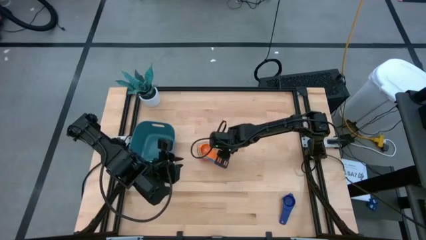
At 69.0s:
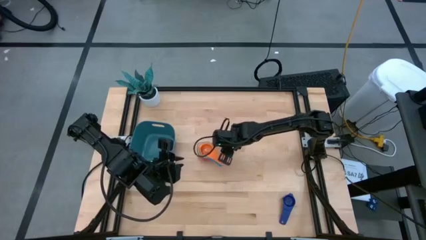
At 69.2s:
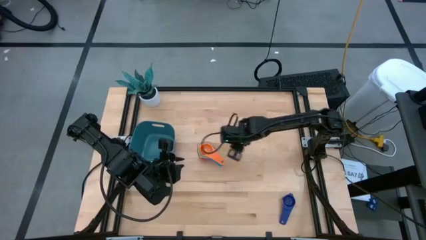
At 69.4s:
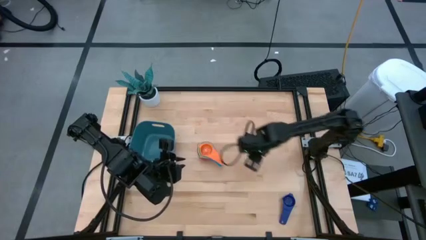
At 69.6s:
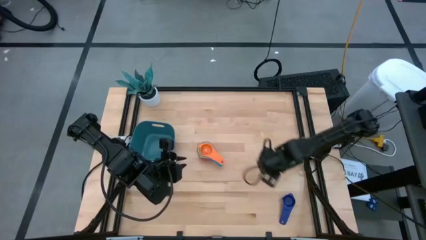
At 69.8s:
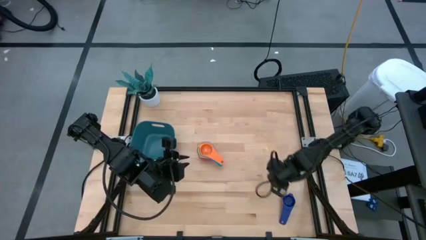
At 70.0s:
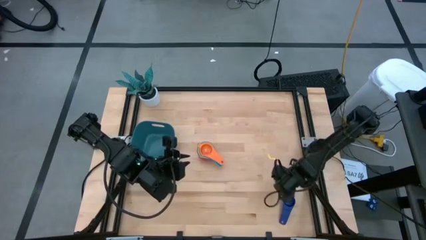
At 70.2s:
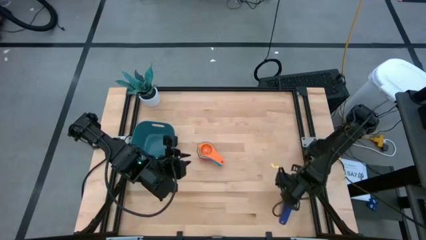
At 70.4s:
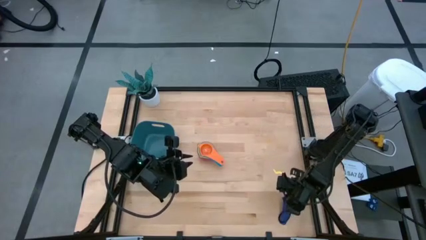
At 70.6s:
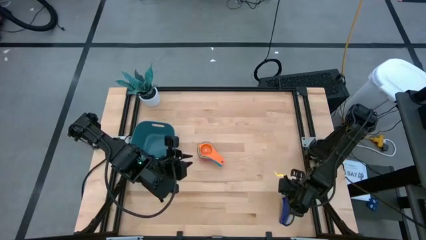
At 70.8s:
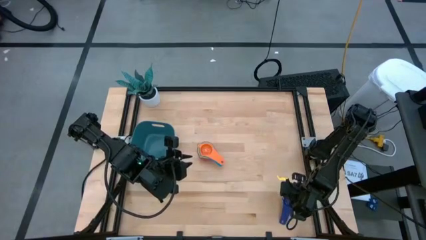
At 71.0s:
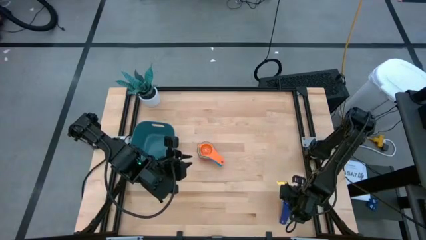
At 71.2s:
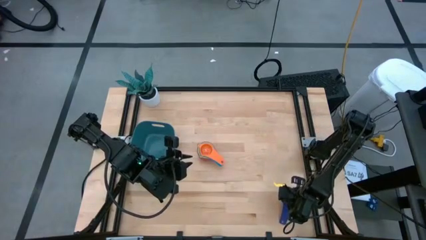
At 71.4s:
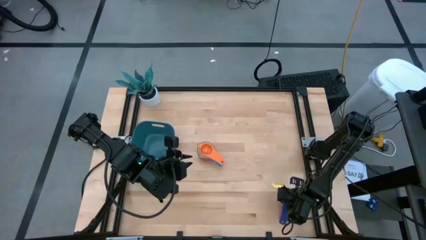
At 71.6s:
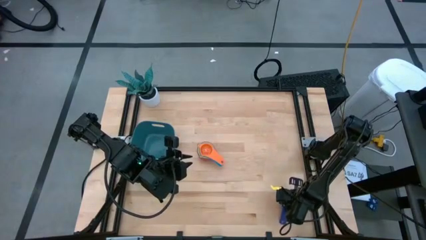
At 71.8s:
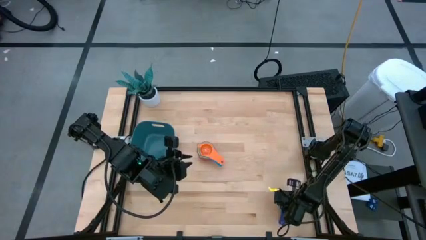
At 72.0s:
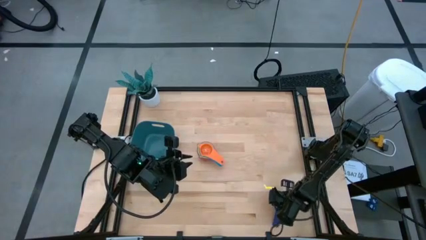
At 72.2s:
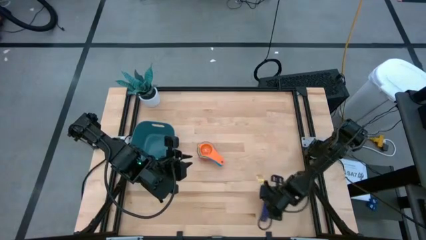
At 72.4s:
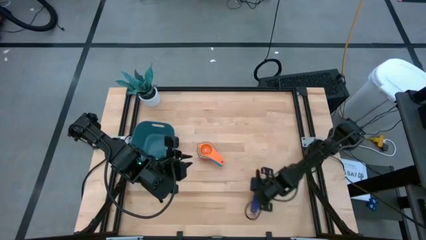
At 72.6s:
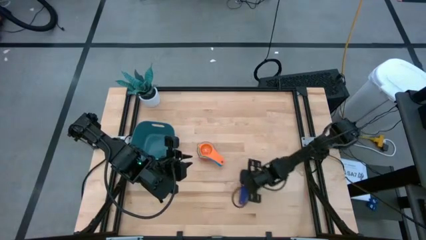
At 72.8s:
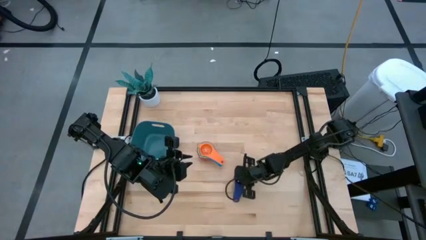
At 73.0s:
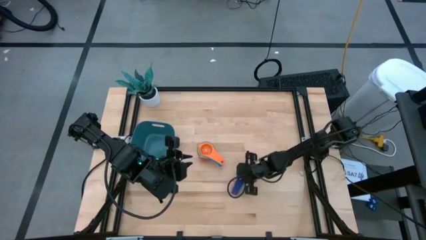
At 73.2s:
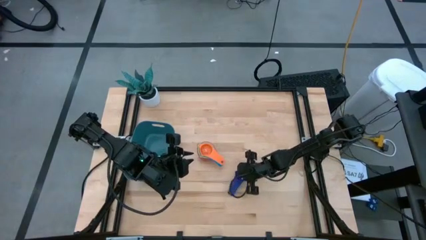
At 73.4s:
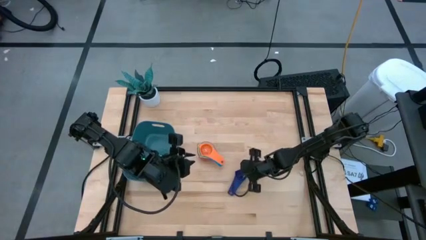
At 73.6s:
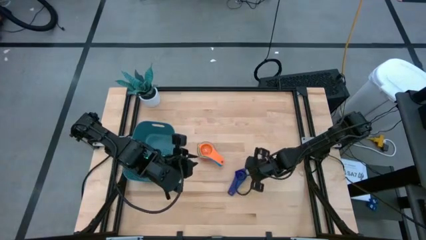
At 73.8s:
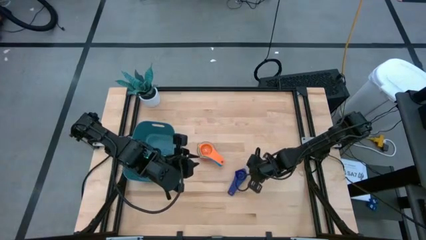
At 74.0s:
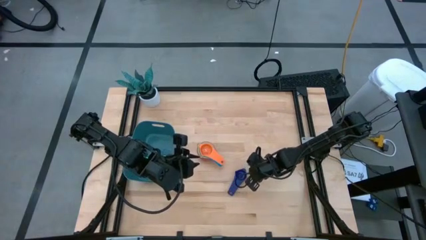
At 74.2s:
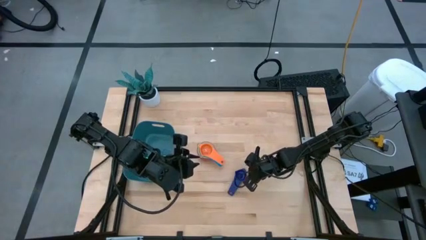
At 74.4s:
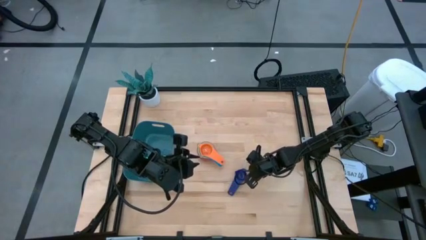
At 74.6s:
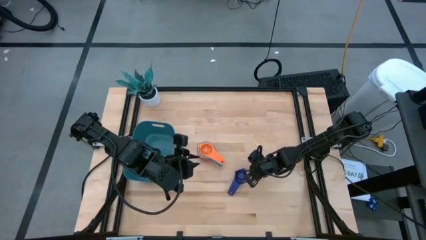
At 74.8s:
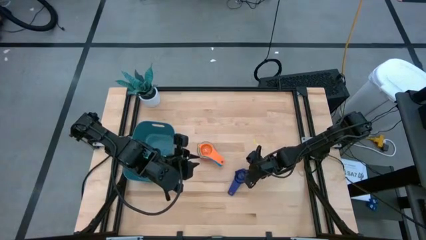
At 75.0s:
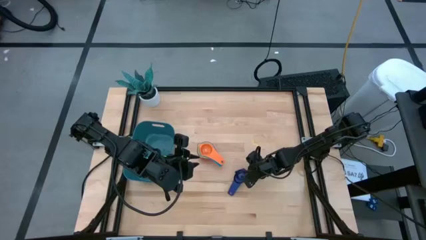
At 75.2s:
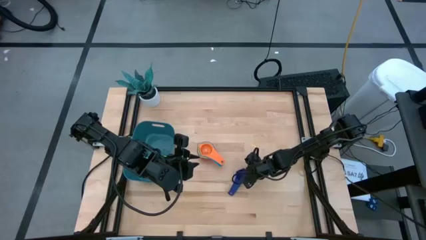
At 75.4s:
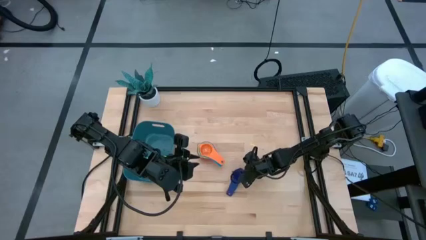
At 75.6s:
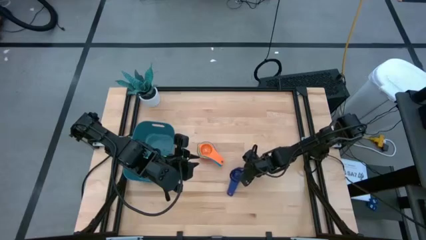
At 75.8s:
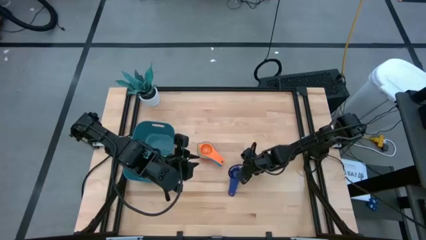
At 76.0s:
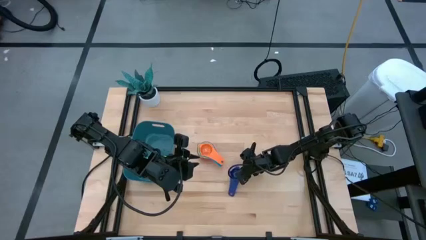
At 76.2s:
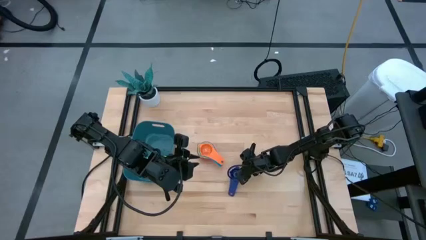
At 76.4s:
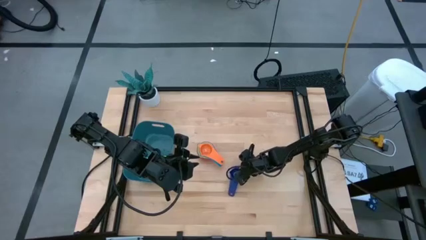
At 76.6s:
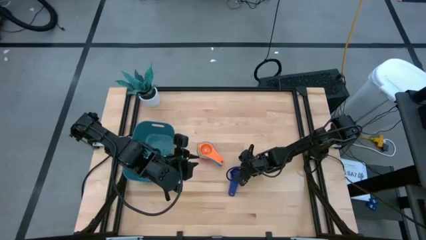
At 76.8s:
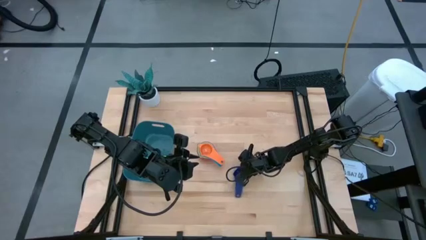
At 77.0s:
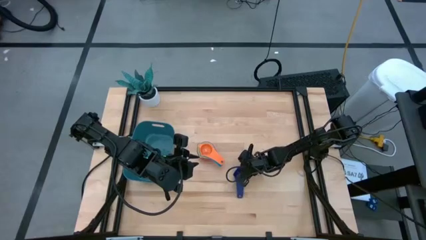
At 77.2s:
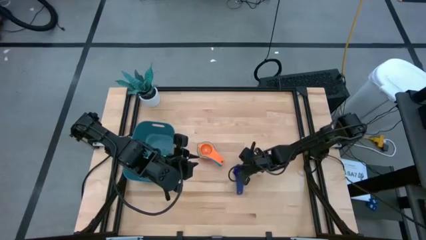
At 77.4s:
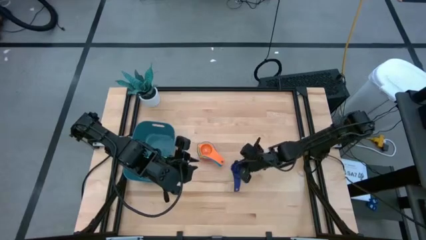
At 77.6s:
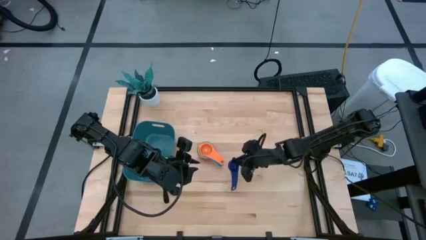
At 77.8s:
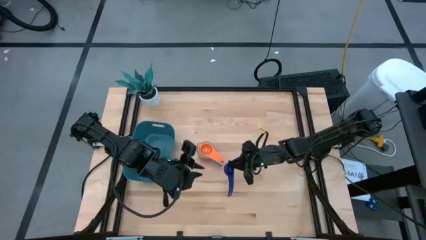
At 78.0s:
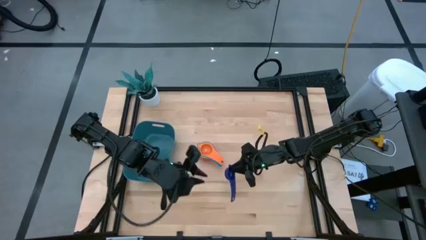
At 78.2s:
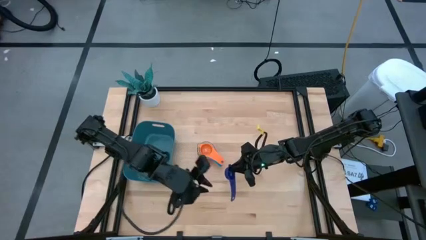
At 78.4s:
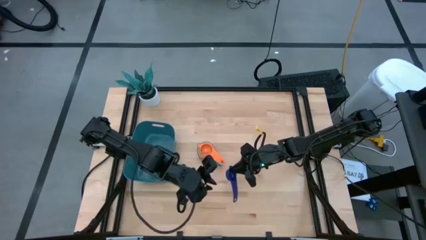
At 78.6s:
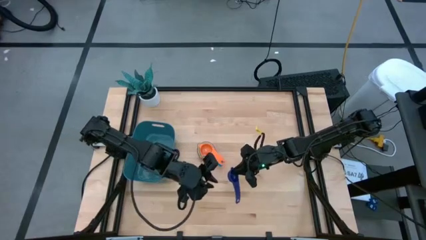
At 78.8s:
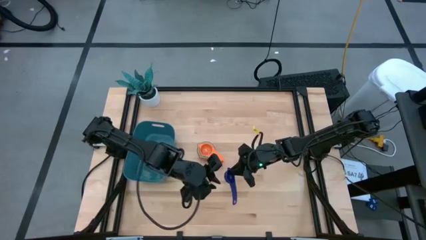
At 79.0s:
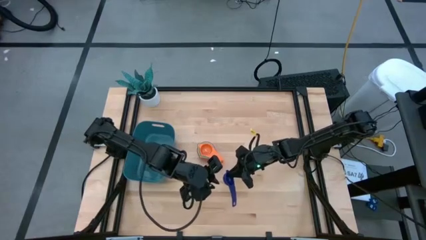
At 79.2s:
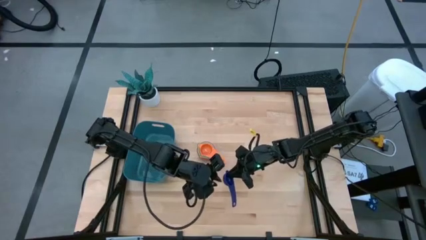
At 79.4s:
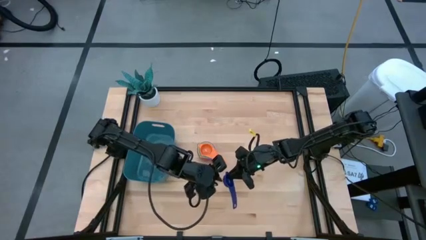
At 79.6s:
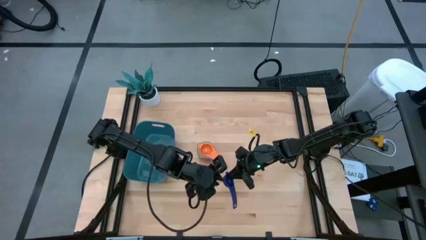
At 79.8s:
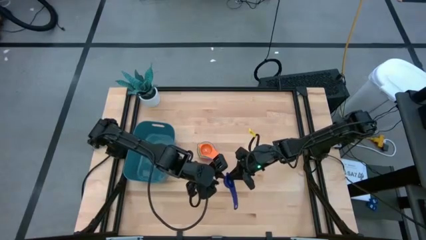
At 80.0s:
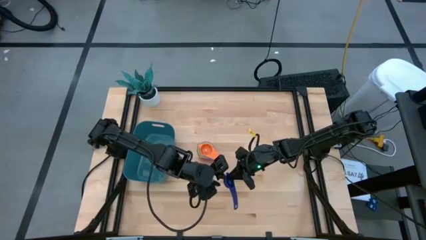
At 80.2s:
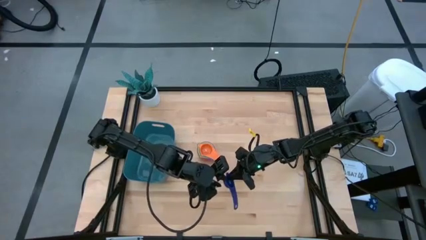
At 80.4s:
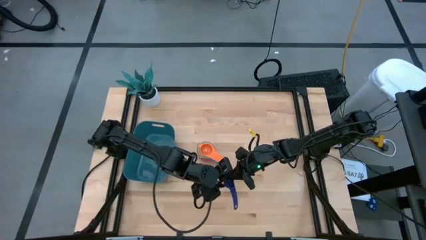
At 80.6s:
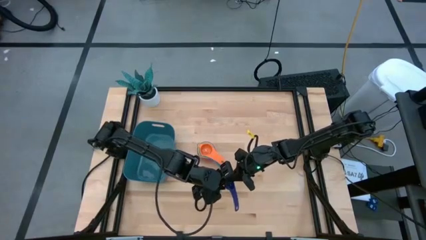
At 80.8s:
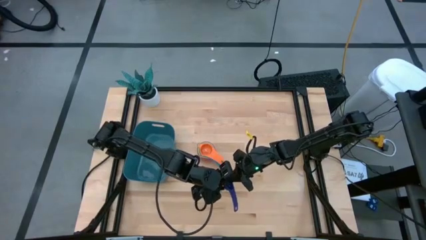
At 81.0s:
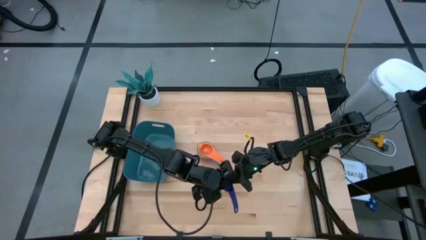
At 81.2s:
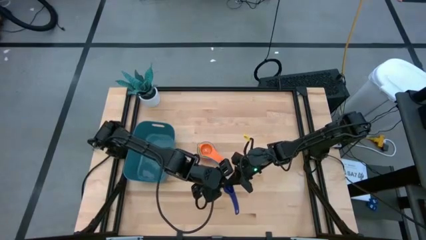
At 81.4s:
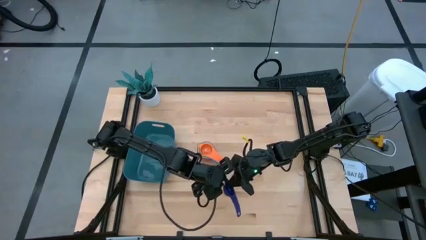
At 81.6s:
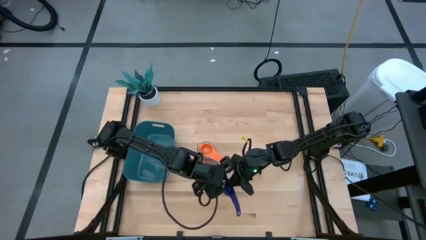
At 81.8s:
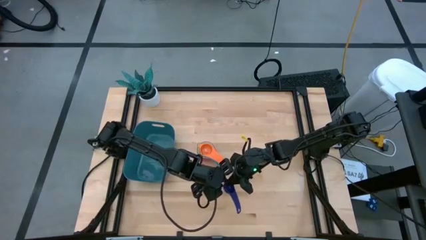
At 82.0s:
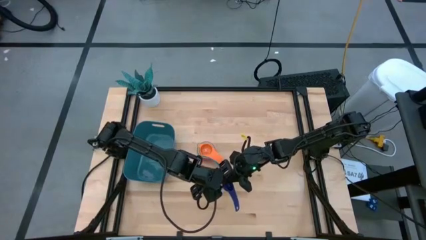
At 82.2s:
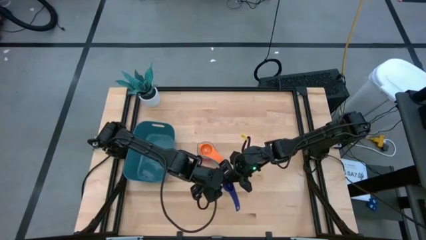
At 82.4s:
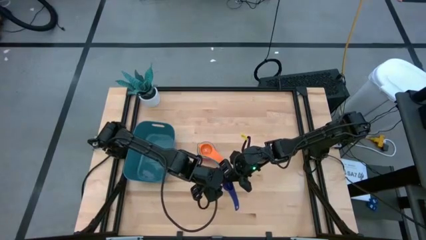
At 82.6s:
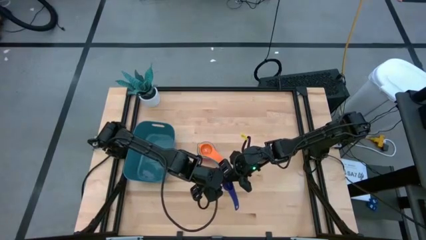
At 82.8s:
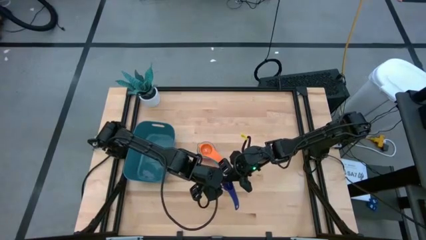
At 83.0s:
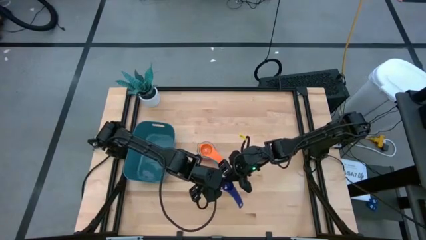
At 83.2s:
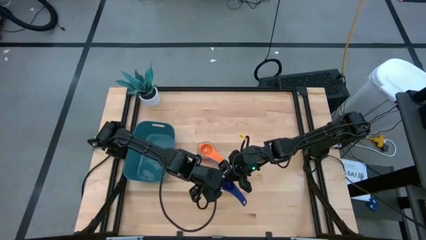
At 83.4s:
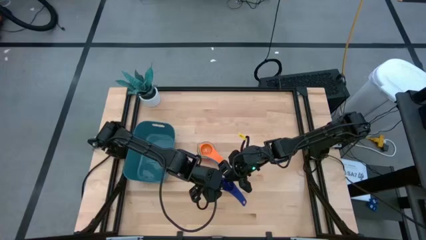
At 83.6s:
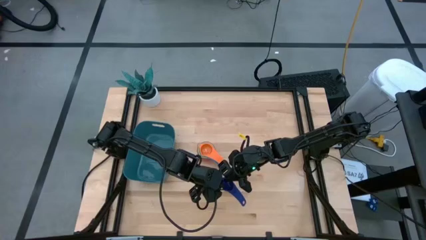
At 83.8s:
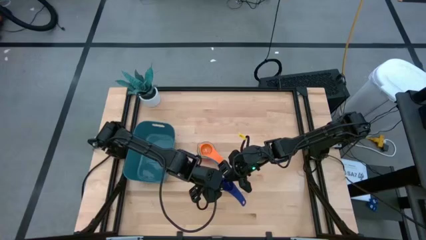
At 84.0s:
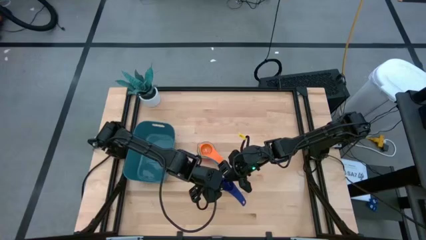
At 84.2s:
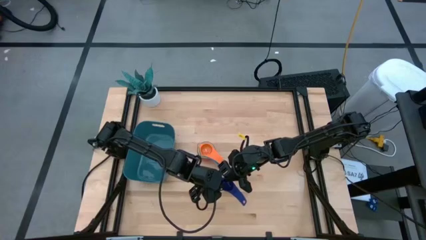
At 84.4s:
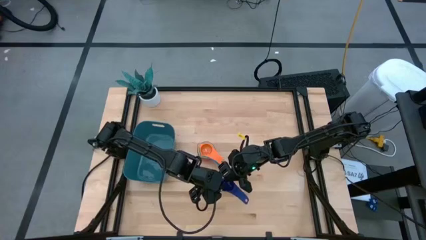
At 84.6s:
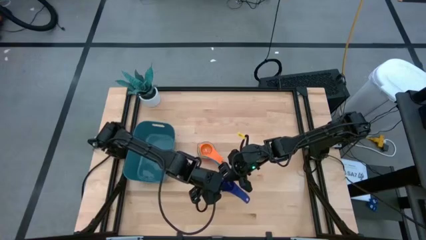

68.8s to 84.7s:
Task: Nest measuring cups in basket
Stack the dark blue measuring cup on top of the orange measuring cup

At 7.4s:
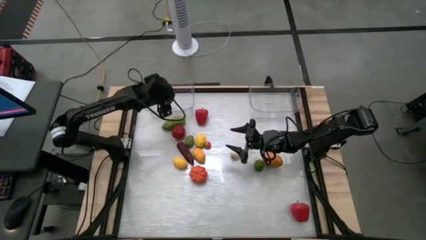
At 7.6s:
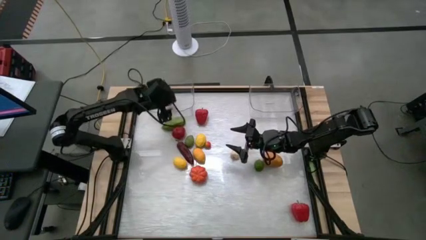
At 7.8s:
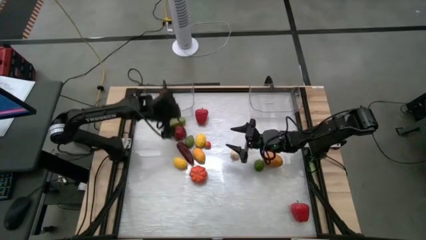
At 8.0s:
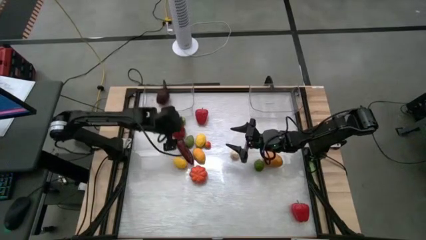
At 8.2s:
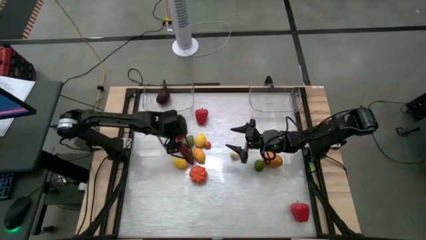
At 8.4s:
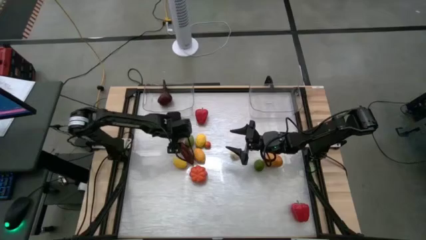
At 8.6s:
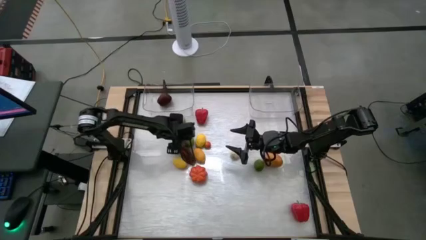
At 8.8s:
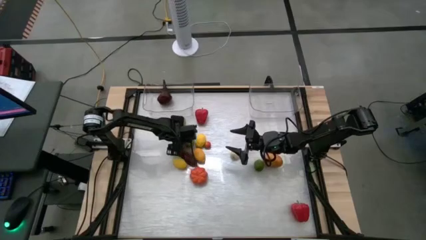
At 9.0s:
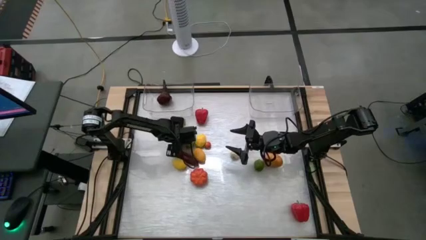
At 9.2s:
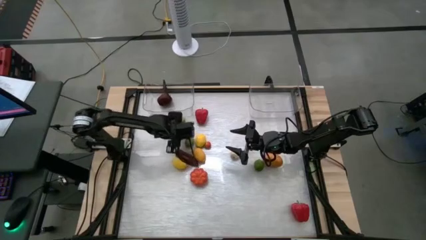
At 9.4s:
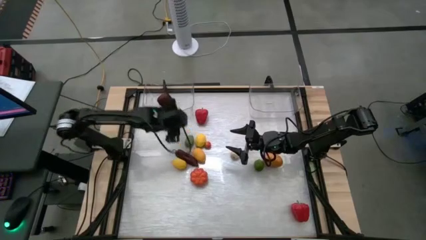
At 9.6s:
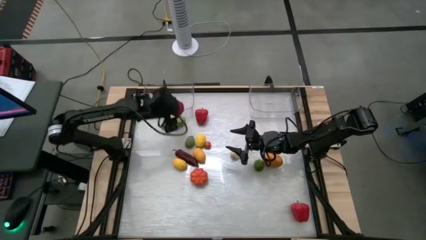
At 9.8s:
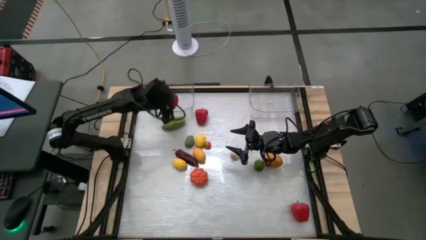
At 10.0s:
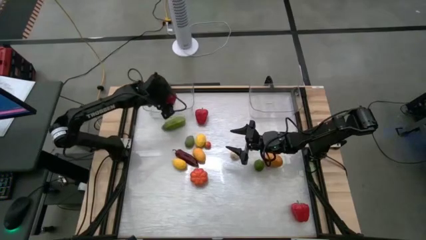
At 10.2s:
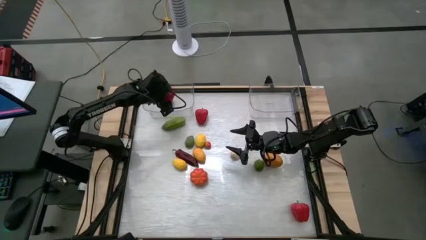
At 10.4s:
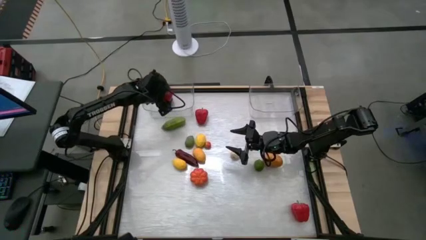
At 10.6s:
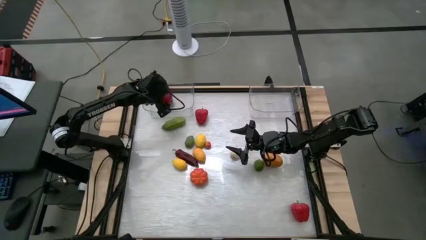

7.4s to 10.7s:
Task: Sort produce into baskets
Put the red tomato into the left transparent bin
